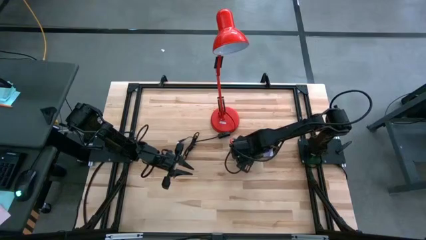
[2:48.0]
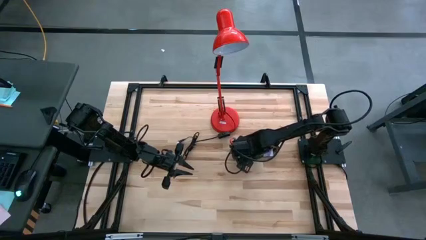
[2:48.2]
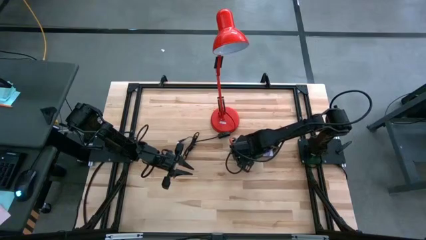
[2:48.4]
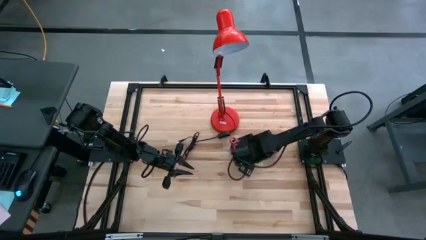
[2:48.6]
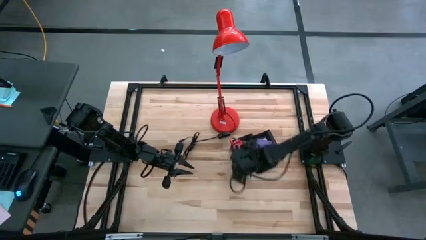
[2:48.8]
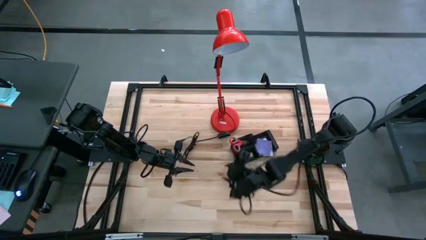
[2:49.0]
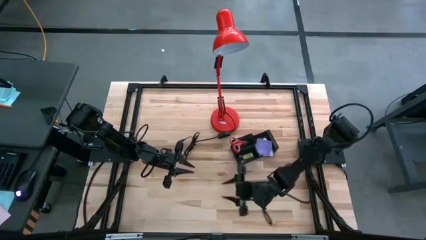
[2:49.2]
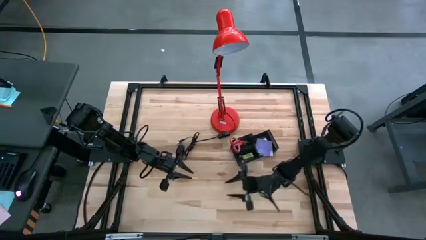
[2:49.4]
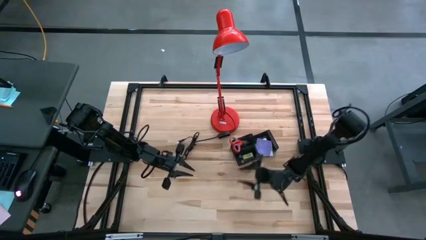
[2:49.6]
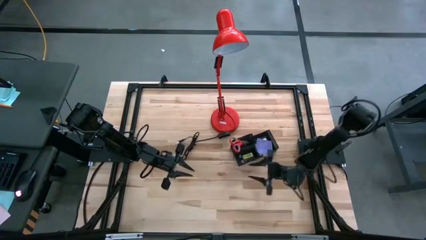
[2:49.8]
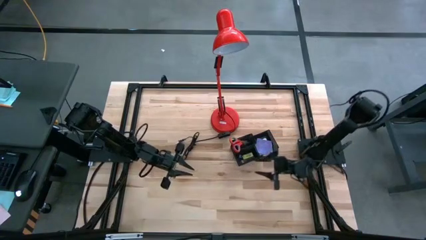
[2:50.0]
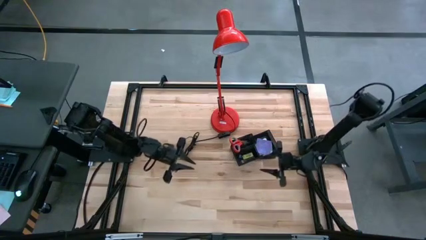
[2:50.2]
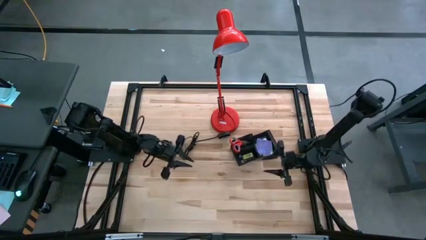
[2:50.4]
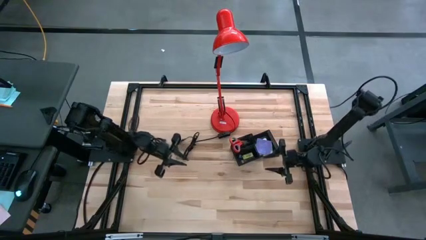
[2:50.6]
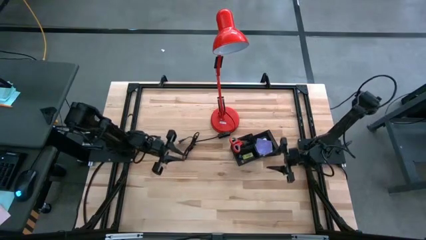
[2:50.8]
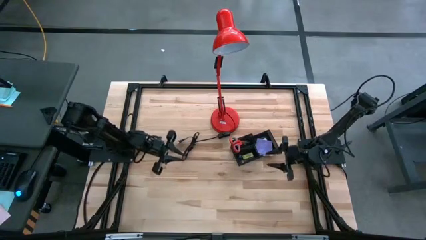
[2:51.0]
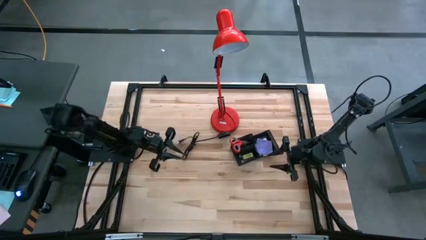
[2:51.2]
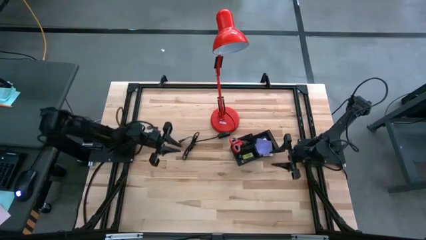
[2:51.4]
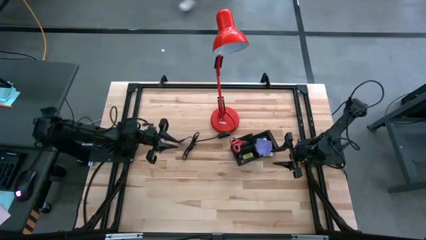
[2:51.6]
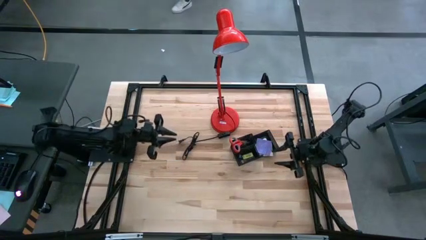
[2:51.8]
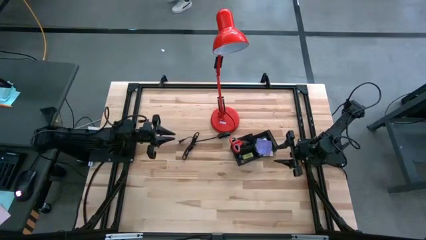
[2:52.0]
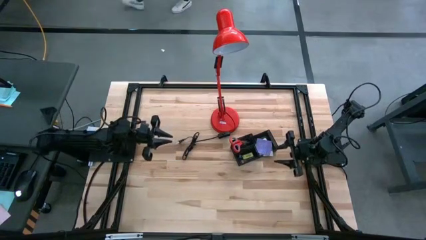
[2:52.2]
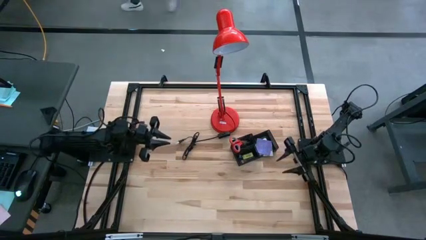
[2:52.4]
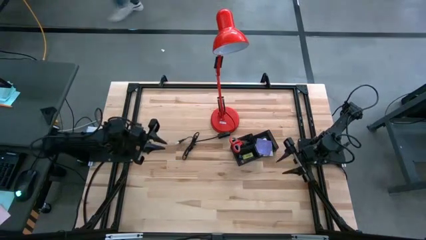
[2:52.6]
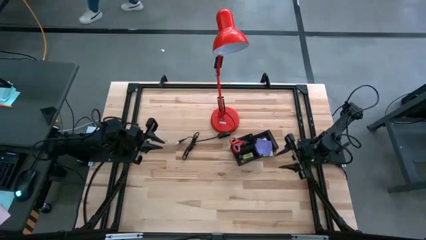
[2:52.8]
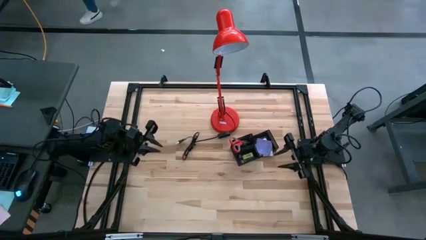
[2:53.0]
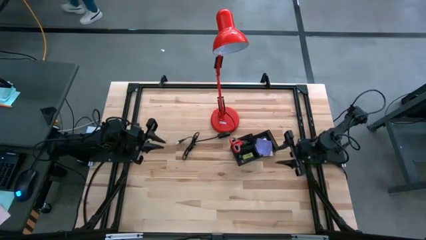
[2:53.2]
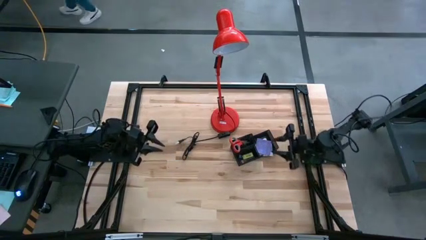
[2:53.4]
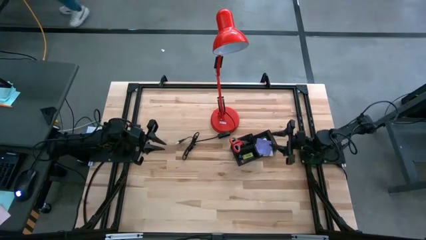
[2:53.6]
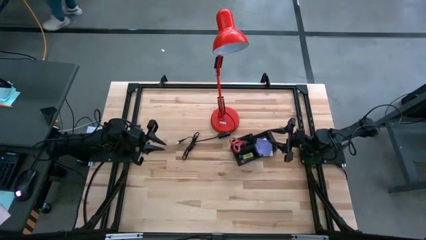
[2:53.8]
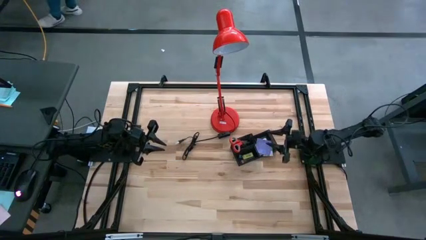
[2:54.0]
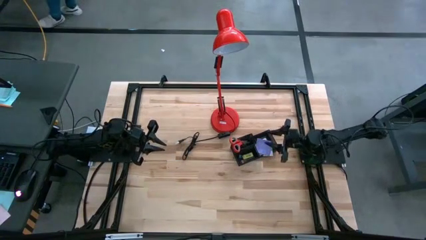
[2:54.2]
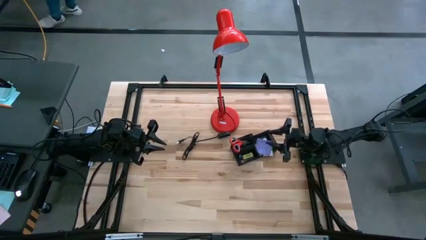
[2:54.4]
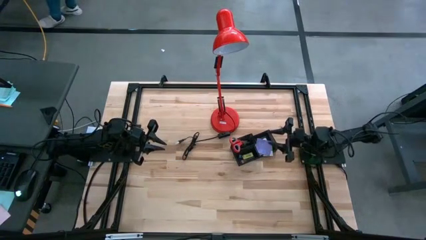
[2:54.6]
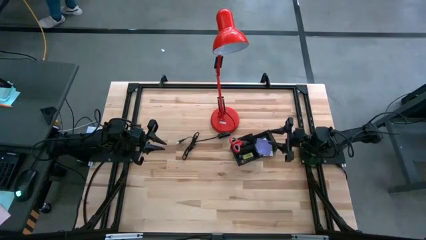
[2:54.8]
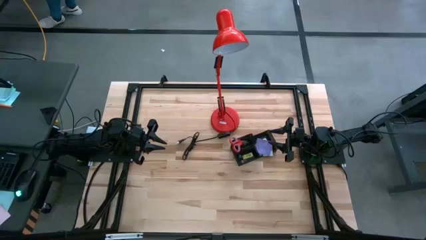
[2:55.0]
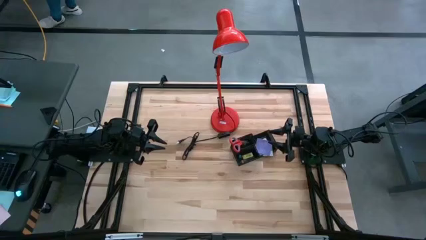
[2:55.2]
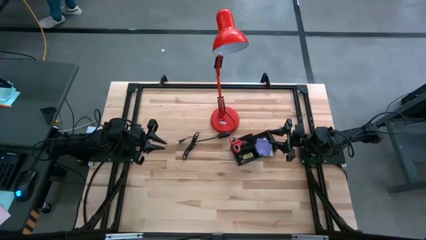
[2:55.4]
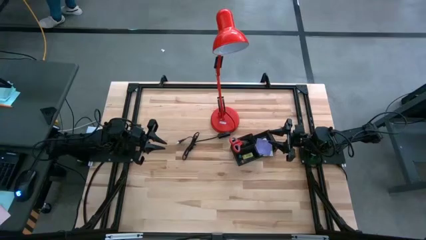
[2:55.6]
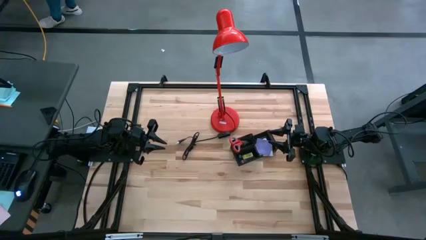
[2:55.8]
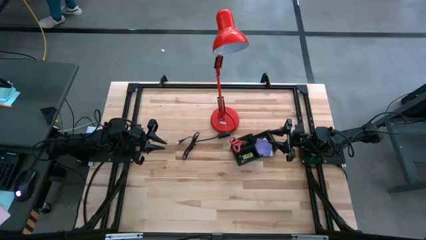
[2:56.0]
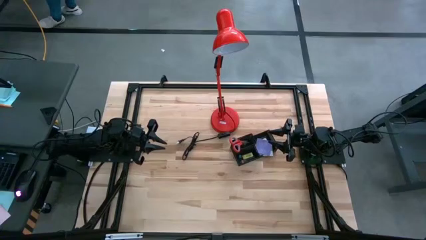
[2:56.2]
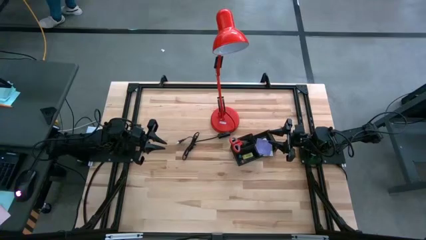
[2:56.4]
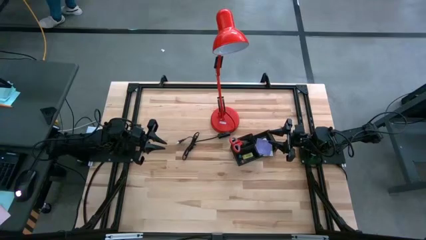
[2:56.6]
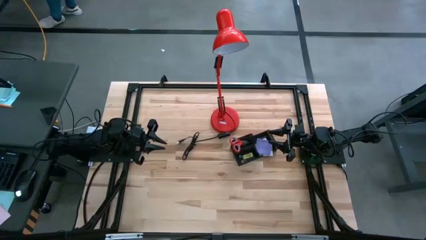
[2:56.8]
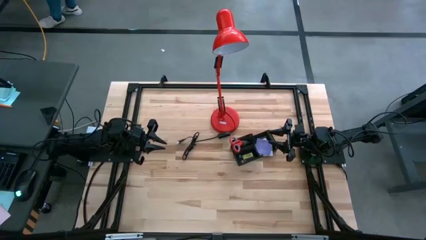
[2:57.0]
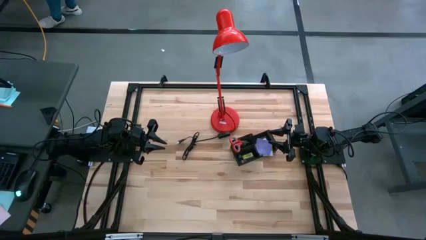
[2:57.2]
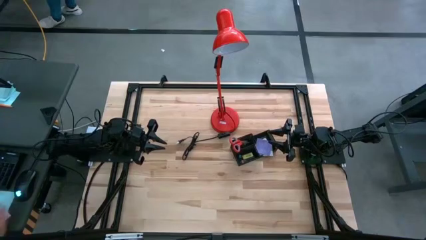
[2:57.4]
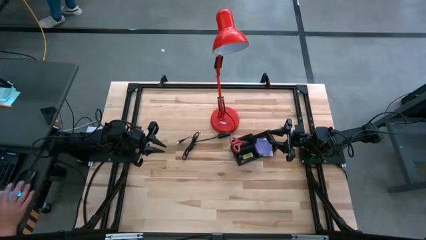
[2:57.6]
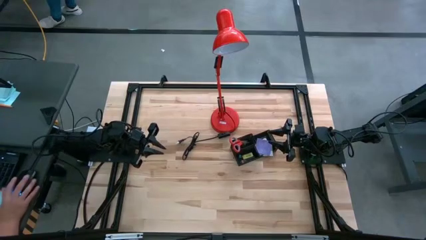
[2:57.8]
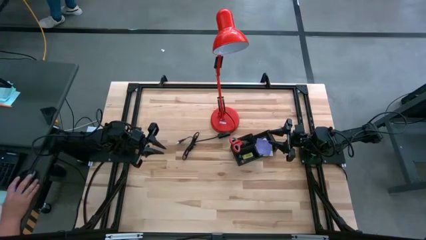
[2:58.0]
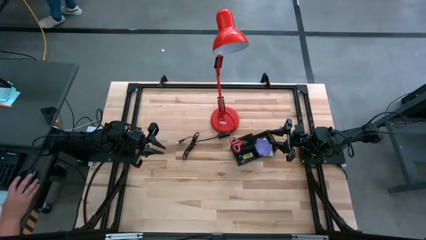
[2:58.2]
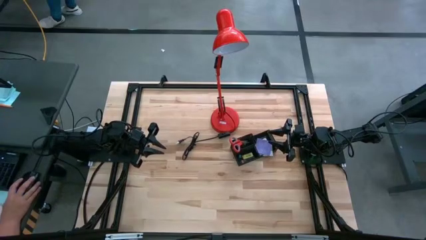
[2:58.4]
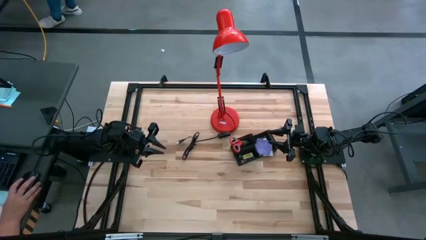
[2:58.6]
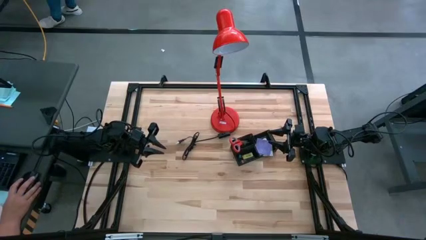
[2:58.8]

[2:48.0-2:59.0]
Task: Pick and place office supplies into organizer
Return to Home Position
